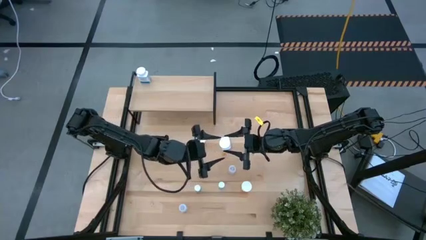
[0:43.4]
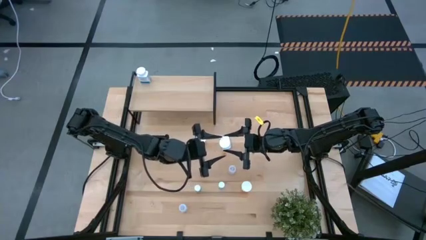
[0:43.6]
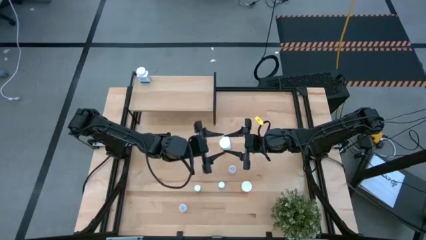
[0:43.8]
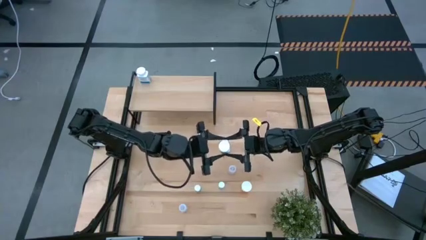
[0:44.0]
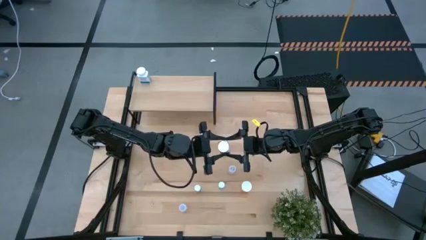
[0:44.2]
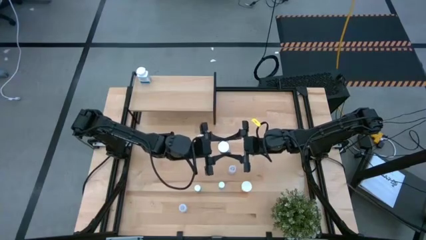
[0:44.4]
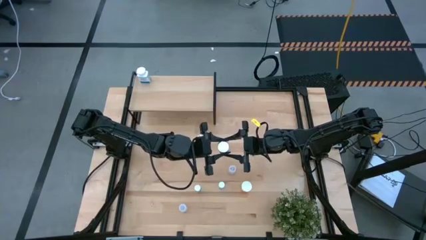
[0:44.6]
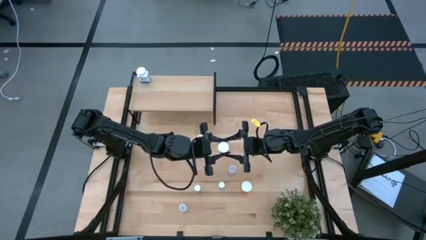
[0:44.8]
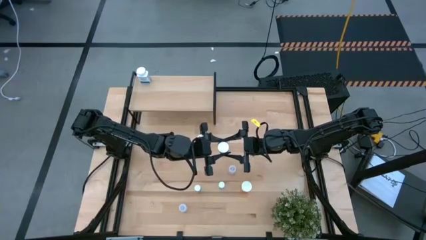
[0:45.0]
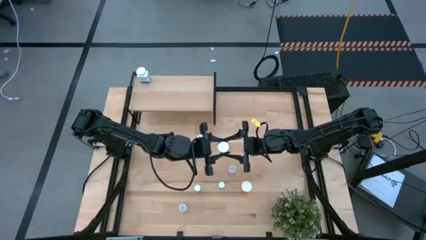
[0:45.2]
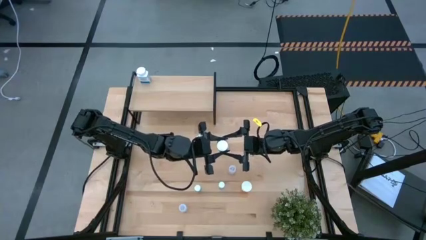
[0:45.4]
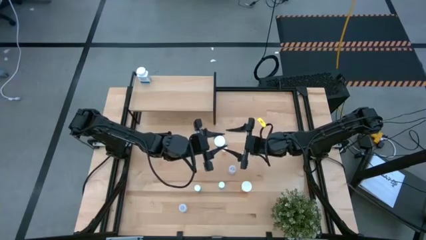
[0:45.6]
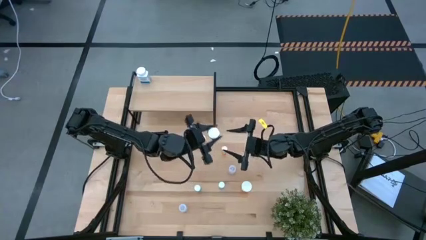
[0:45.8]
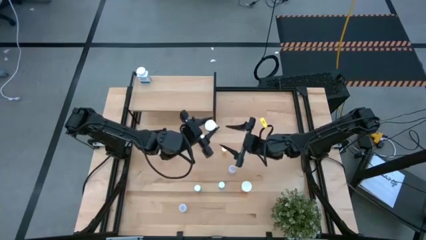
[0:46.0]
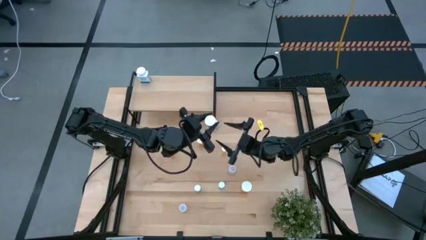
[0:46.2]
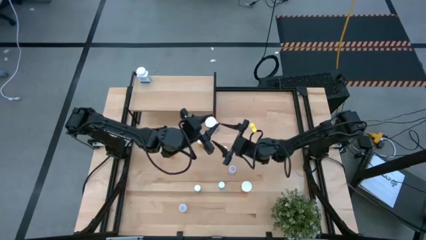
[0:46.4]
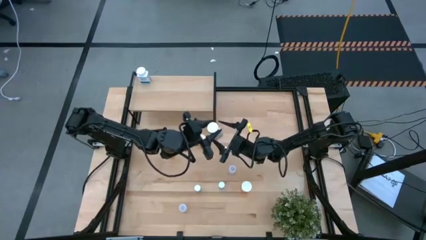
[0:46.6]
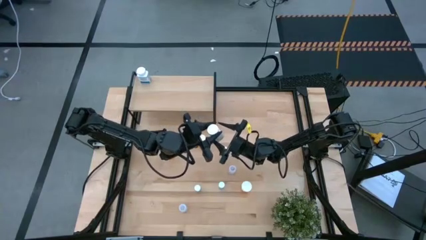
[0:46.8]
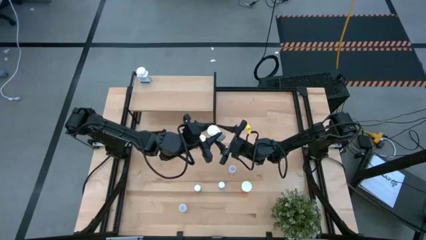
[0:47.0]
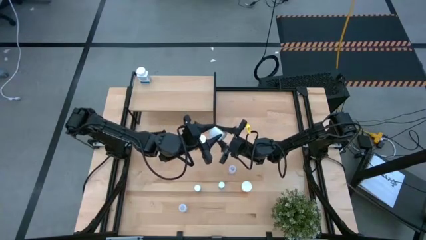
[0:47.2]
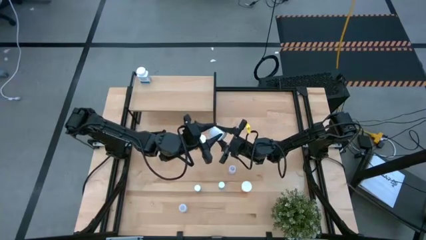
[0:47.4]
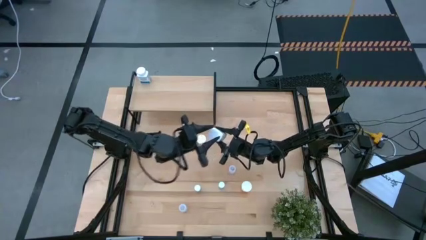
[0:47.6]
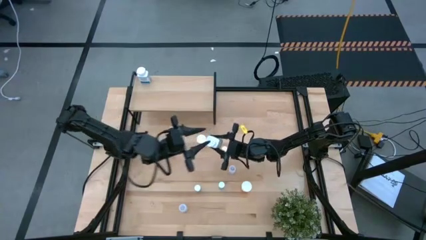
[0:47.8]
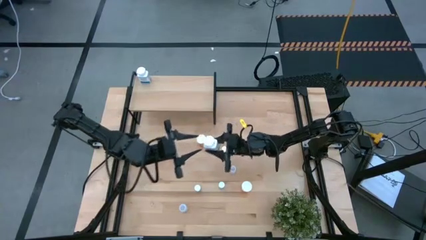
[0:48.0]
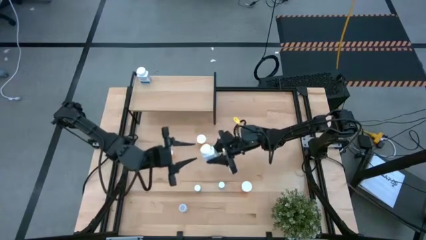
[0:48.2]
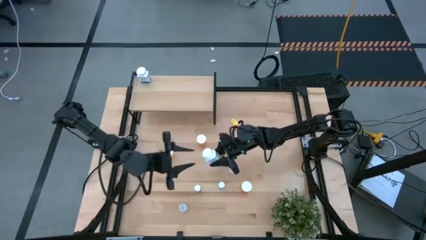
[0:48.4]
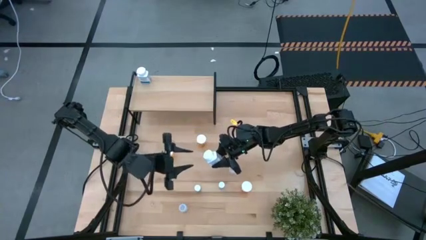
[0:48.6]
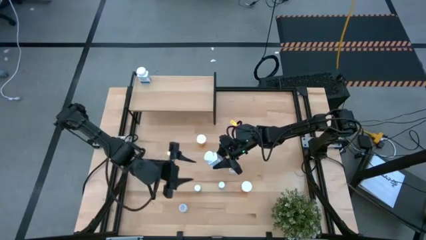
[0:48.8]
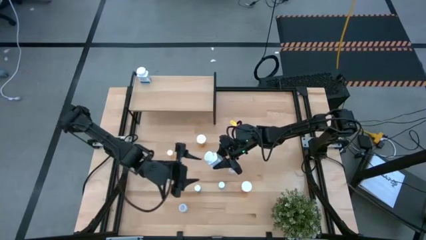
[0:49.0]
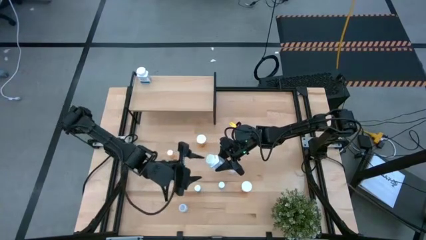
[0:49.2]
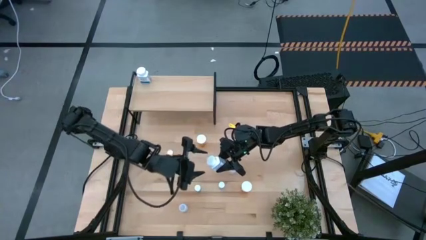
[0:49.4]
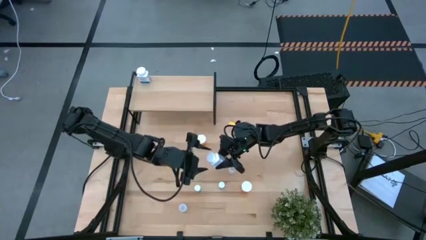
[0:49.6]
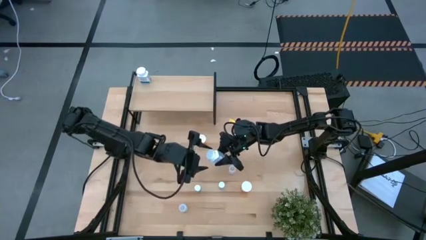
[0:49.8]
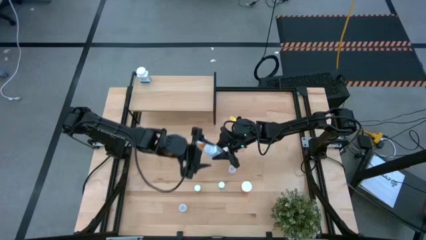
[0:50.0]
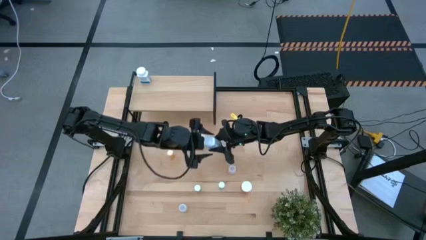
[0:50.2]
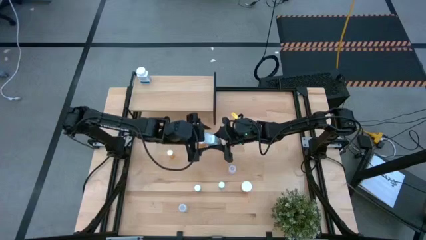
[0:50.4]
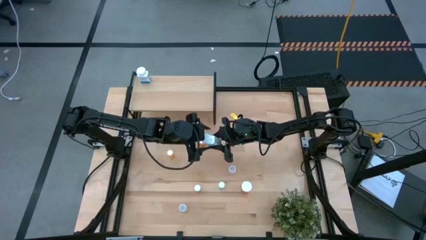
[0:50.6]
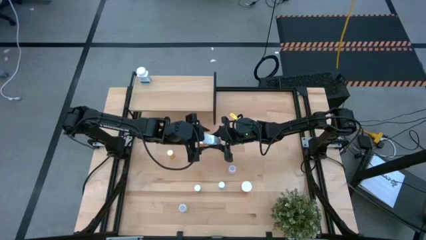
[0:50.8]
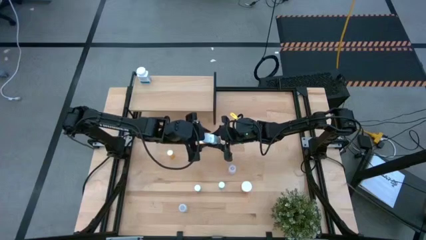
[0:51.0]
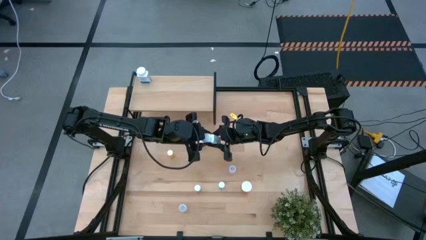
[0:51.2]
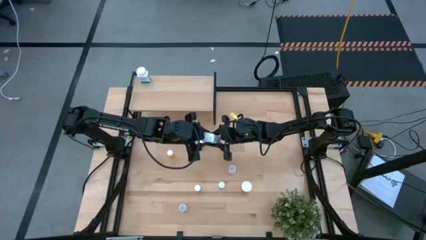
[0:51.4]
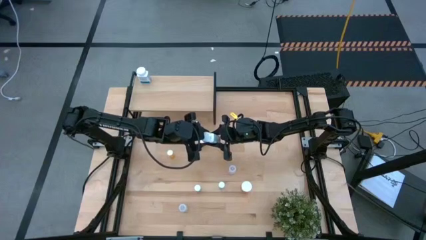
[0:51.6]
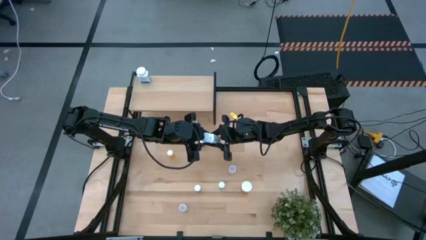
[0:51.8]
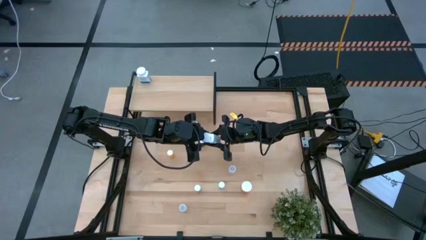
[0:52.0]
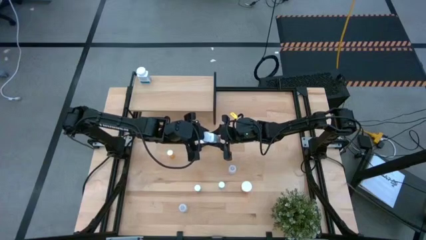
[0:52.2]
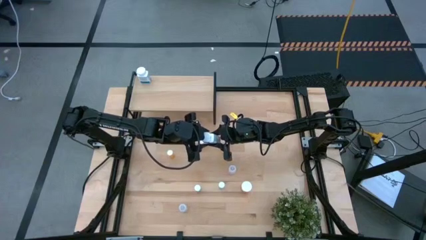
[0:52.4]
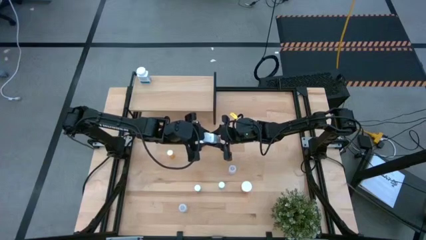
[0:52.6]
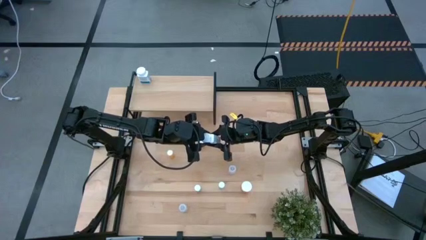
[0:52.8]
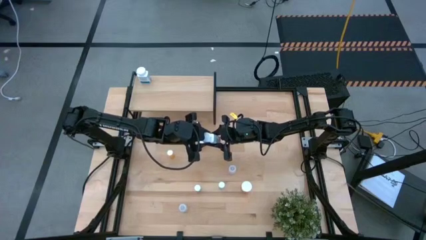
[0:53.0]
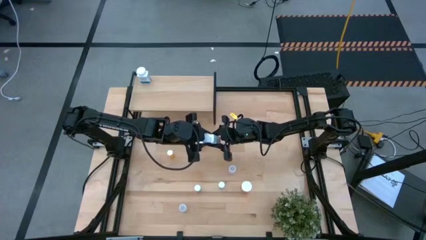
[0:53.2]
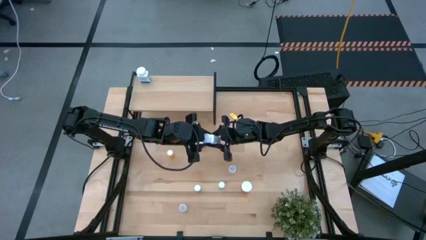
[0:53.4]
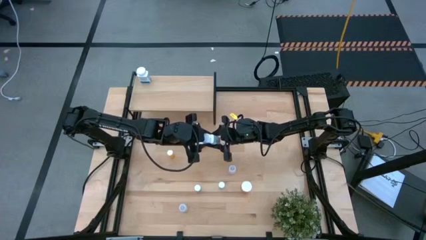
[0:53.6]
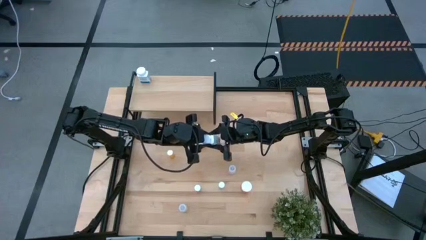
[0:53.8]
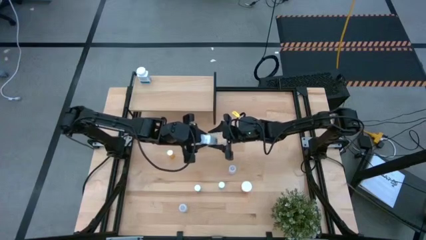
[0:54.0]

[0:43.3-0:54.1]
Task: Pick and place medicine bottles onto shelf by color
Put the white pill bottle on the shelf aligned with the other white pill bottle

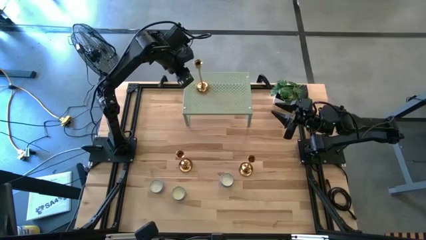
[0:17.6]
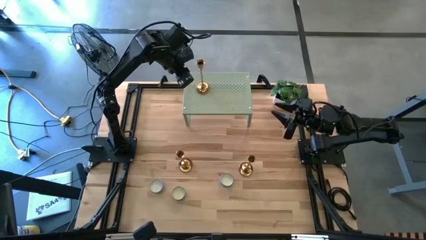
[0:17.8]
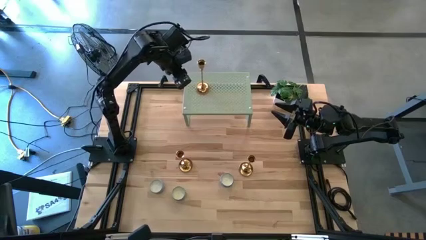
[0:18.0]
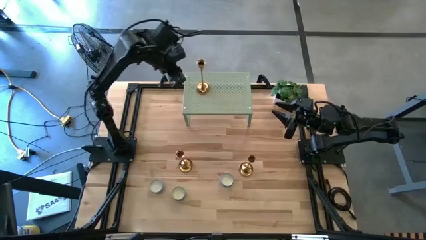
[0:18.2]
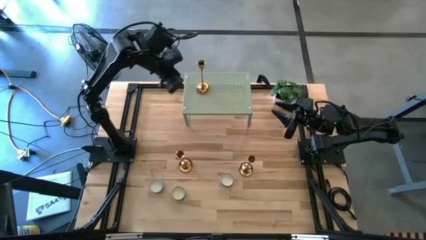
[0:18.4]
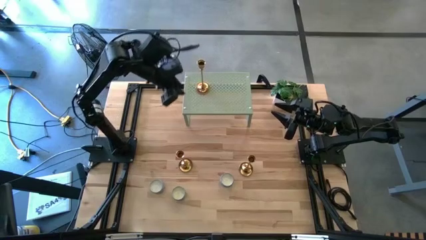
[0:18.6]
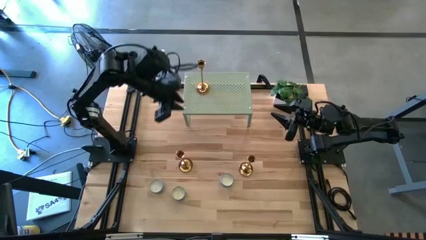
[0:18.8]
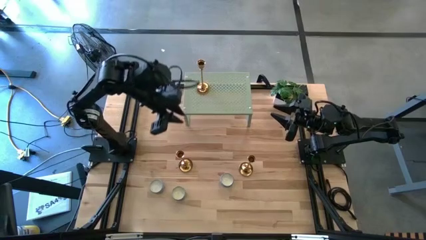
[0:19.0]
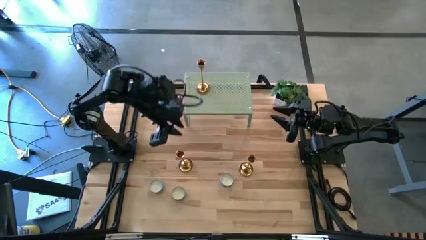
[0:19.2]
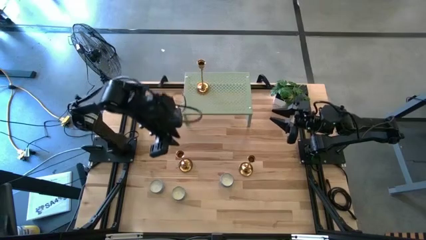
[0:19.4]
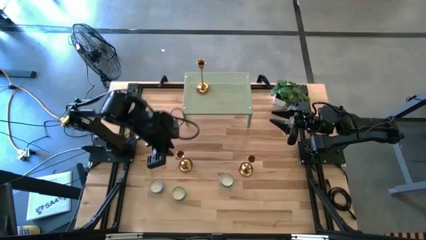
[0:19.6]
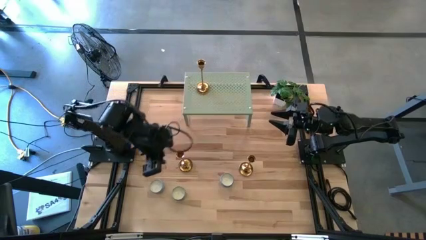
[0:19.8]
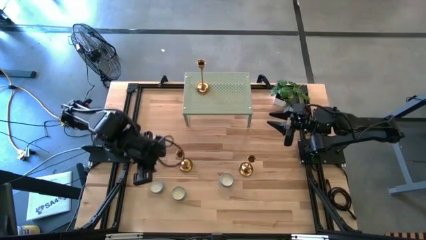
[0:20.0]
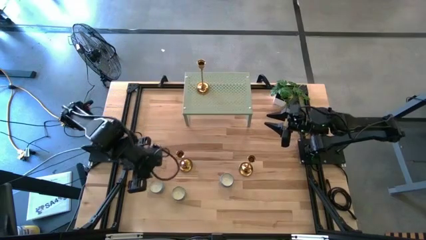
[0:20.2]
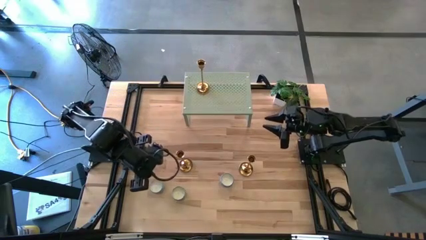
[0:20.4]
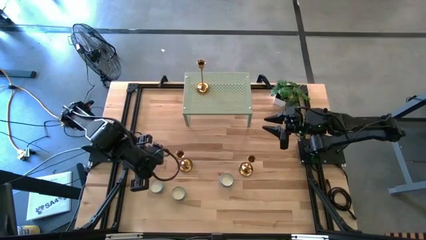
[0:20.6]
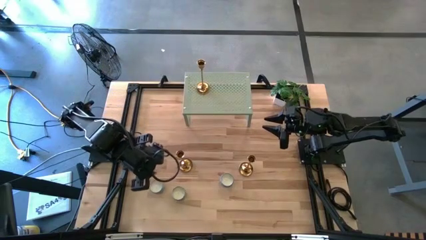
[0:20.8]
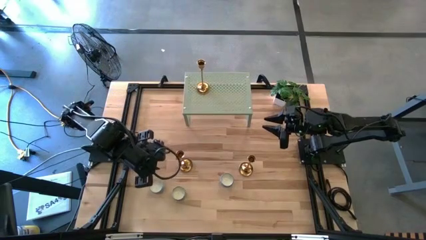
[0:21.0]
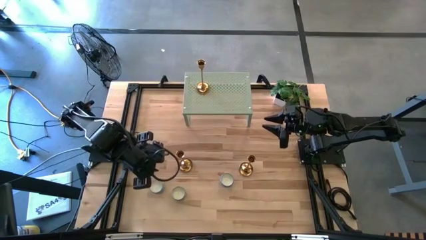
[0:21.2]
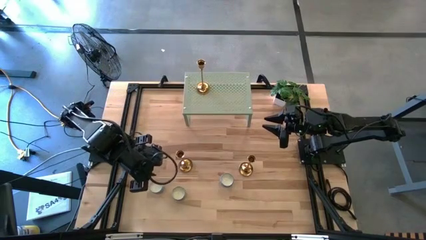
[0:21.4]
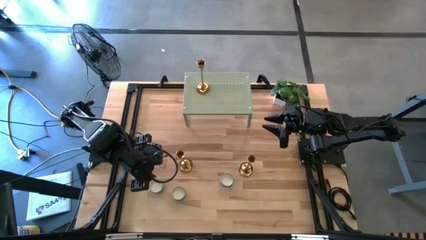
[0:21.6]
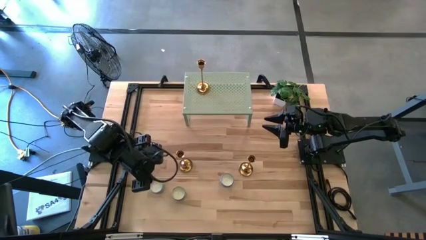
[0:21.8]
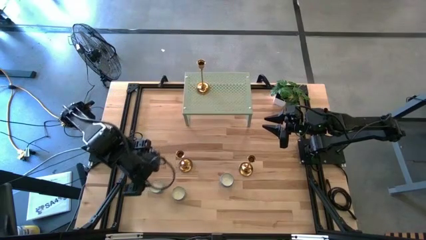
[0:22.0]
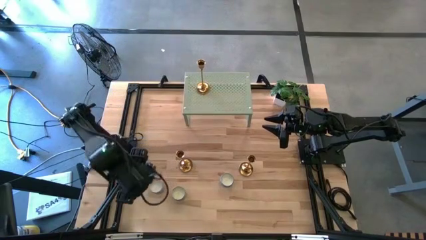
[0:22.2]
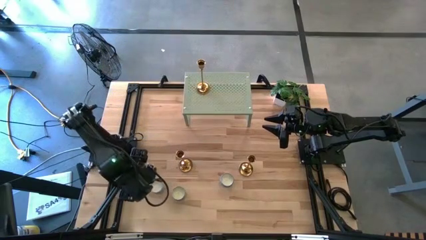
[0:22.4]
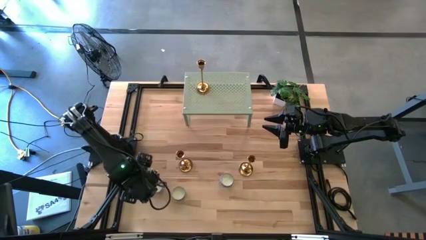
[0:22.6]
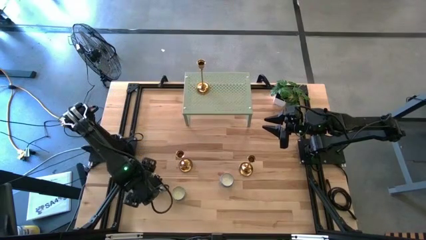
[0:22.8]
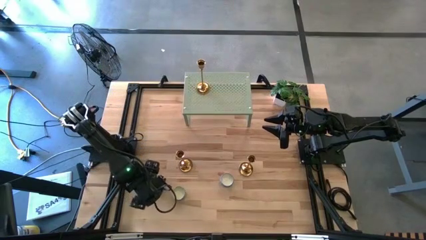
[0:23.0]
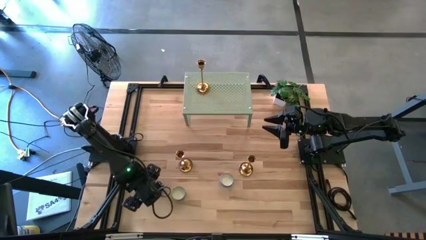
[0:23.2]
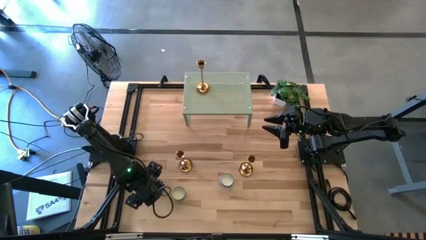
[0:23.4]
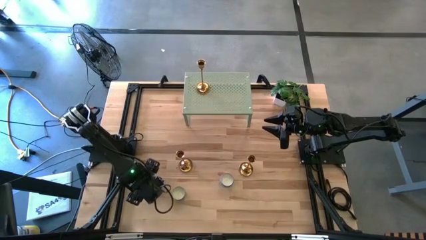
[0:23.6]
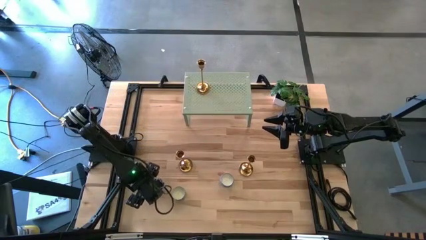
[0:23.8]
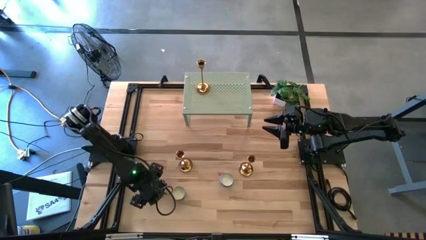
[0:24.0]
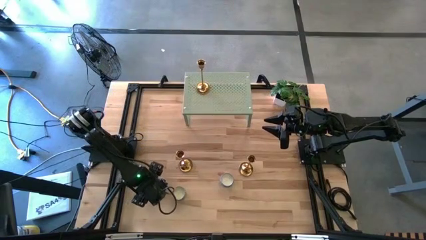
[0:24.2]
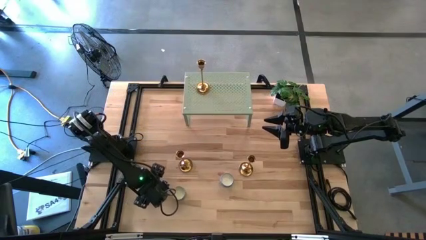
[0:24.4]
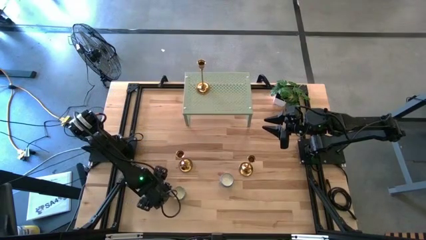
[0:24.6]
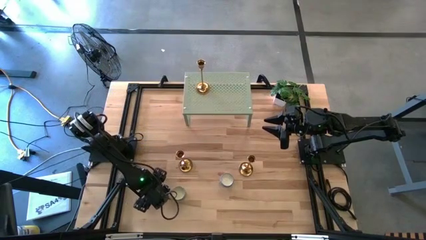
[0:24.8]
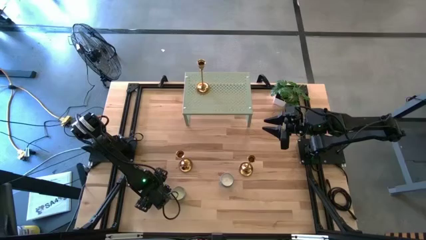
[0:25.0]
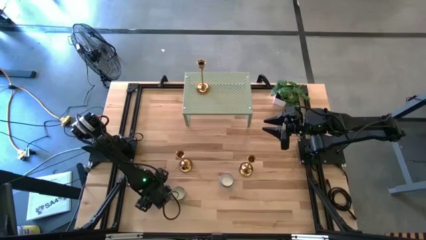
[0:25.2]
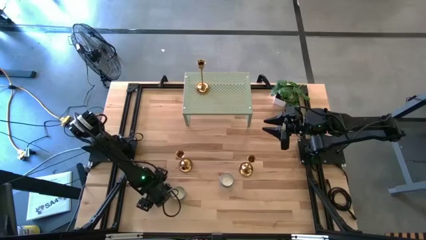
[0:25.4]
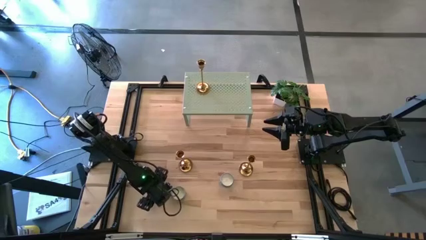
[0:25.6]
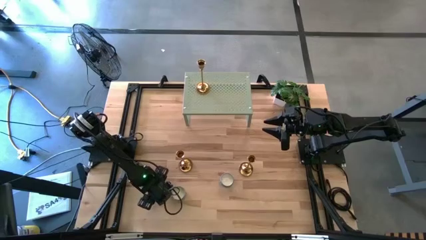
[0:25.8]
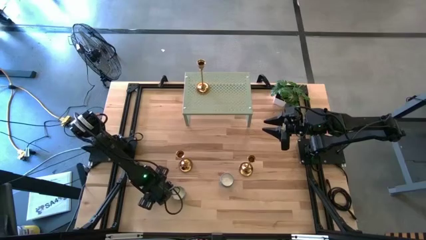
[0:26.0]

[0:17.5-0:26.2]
Task: Pick & Place candle stick holders
Put the top left blue scented candle on the shelf
